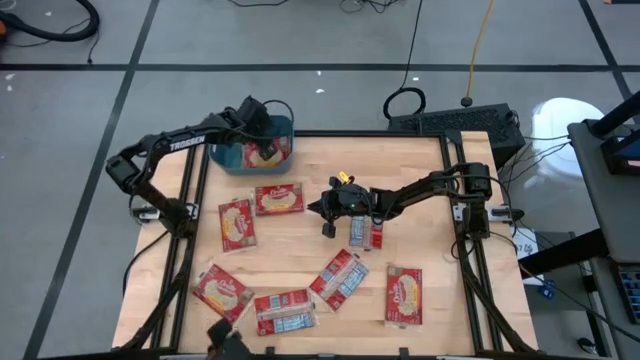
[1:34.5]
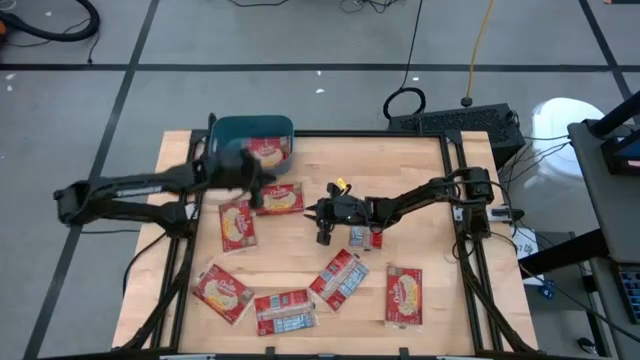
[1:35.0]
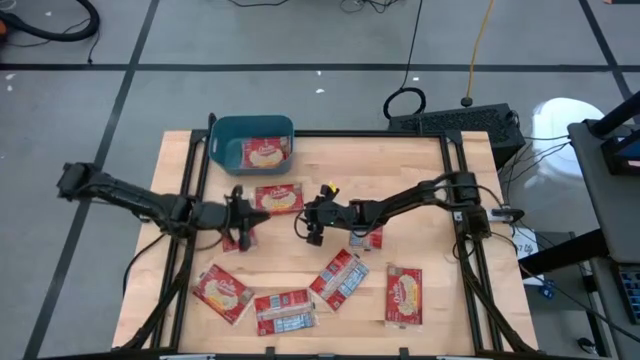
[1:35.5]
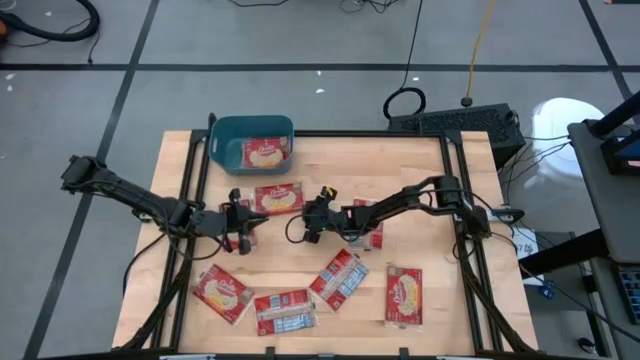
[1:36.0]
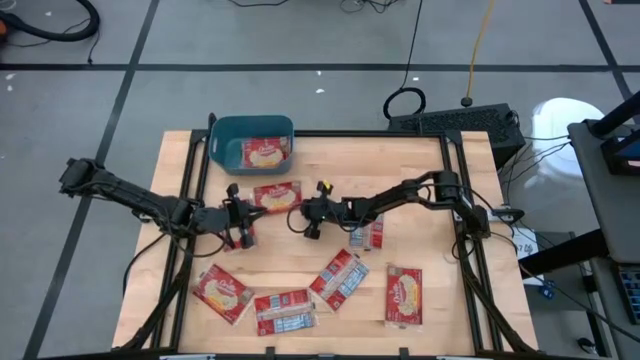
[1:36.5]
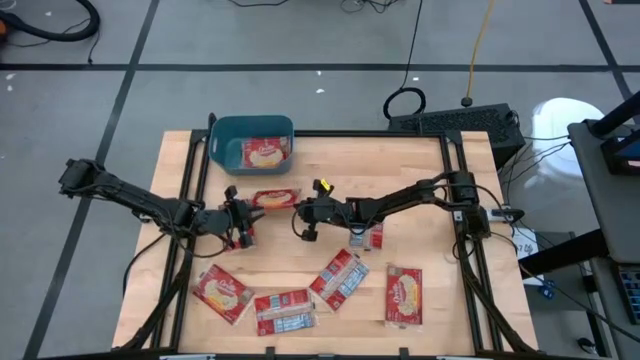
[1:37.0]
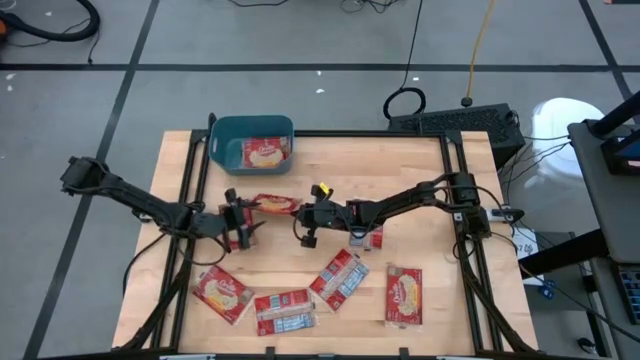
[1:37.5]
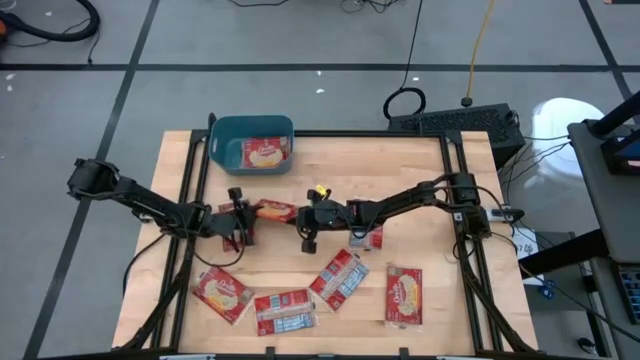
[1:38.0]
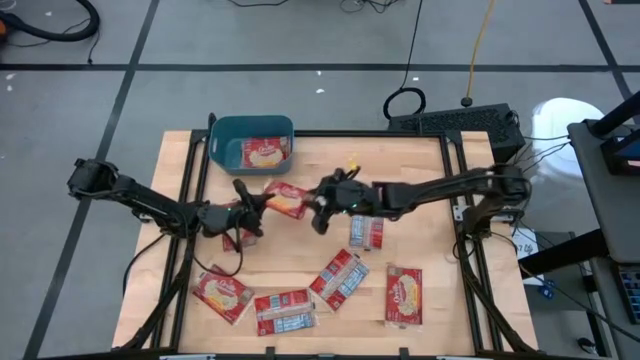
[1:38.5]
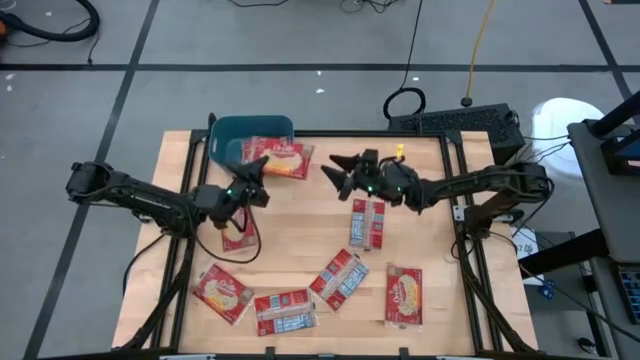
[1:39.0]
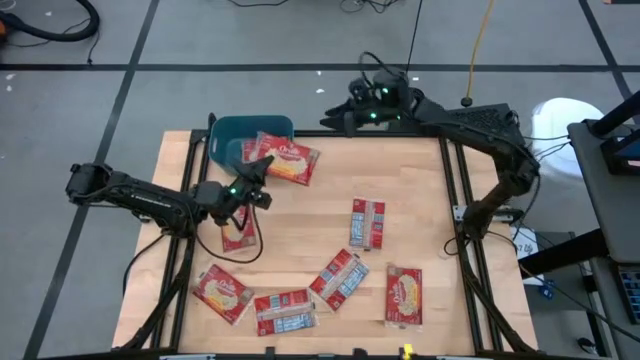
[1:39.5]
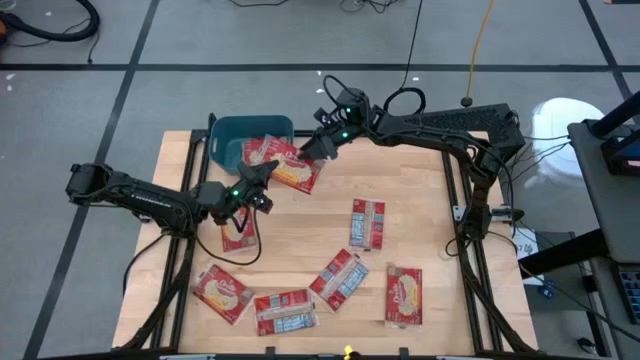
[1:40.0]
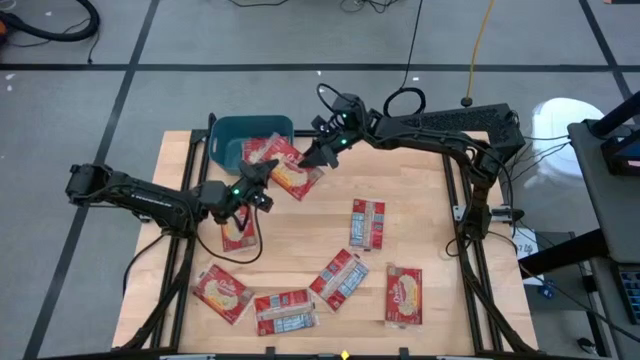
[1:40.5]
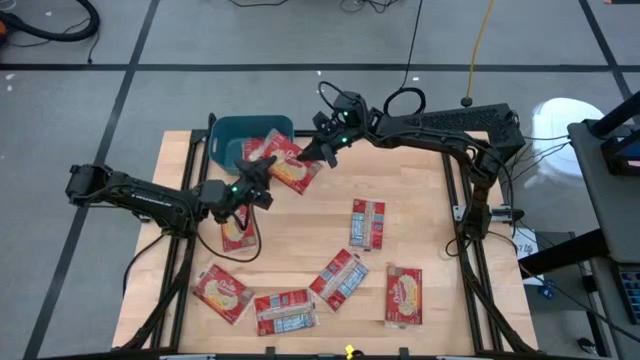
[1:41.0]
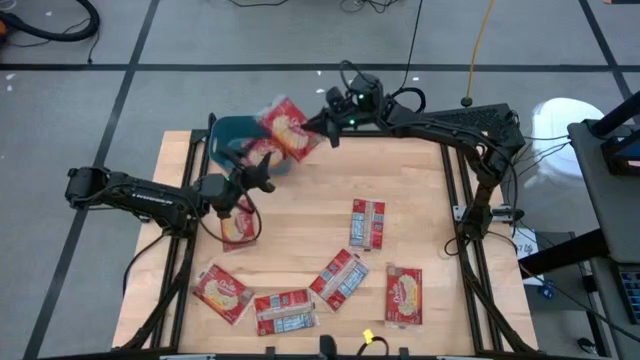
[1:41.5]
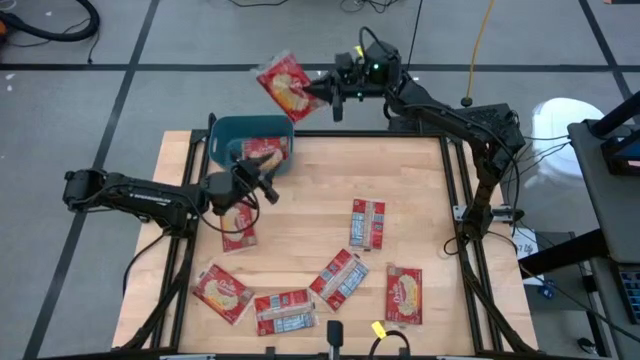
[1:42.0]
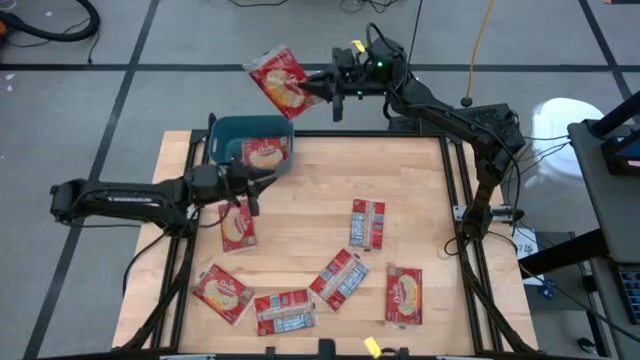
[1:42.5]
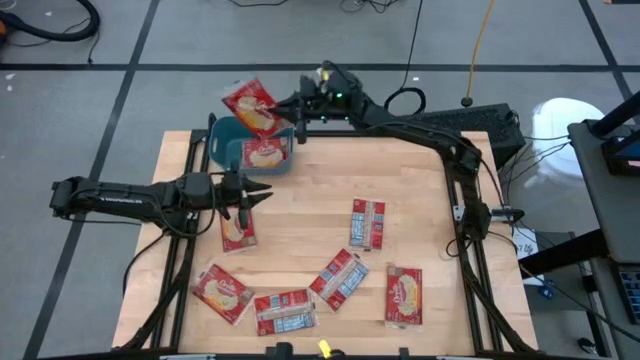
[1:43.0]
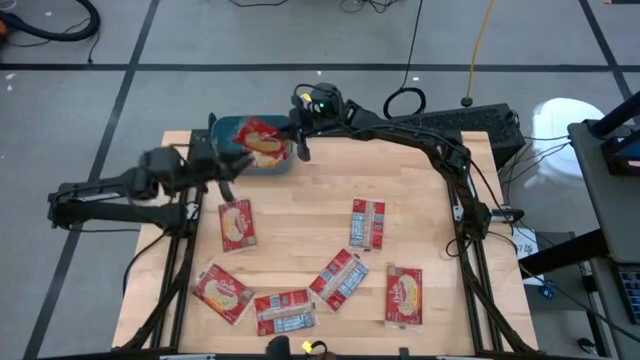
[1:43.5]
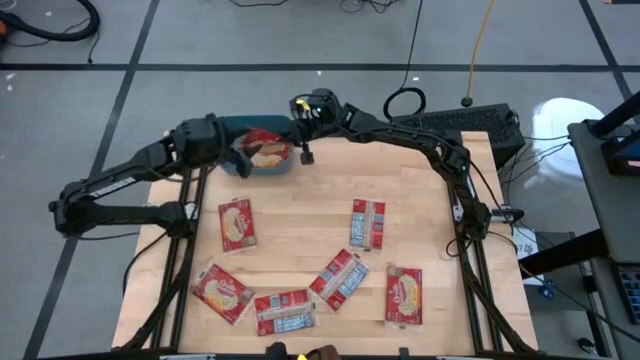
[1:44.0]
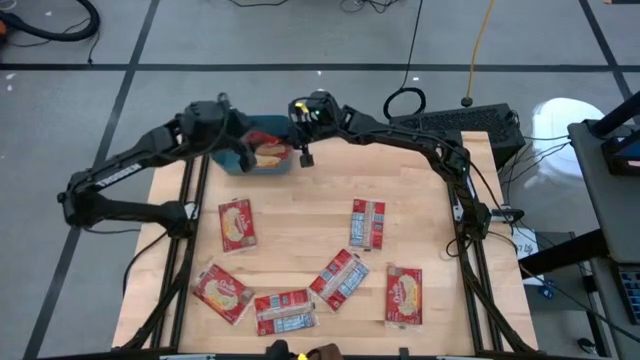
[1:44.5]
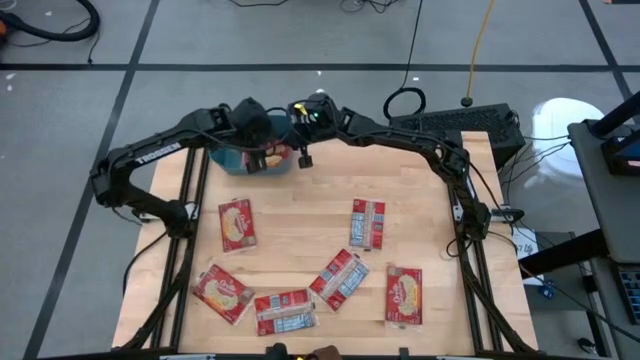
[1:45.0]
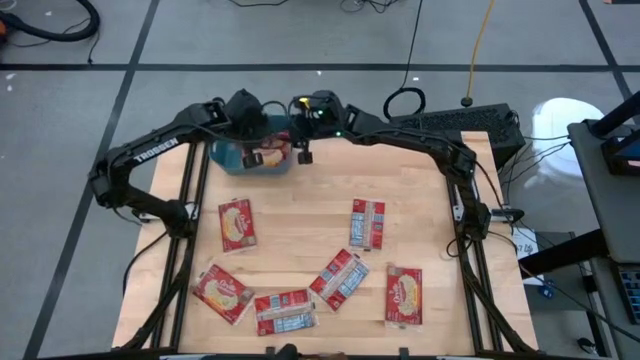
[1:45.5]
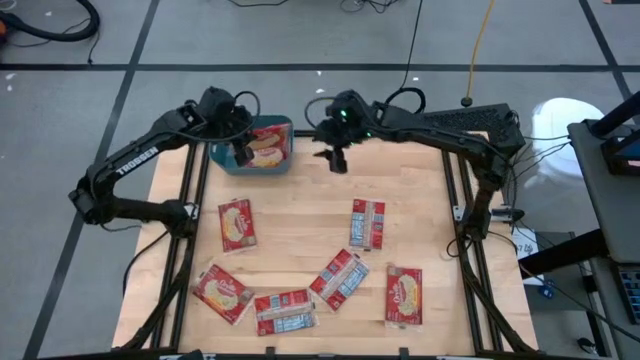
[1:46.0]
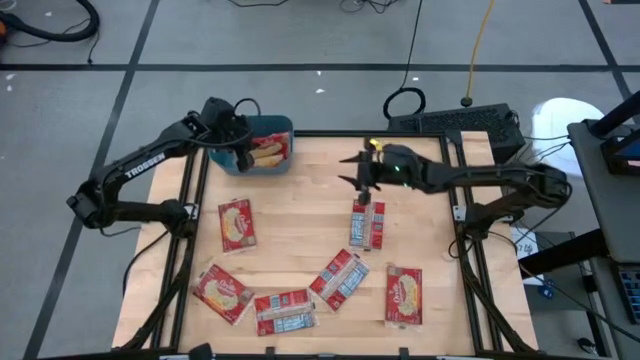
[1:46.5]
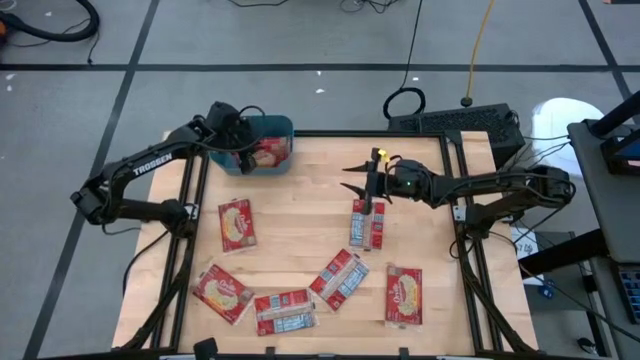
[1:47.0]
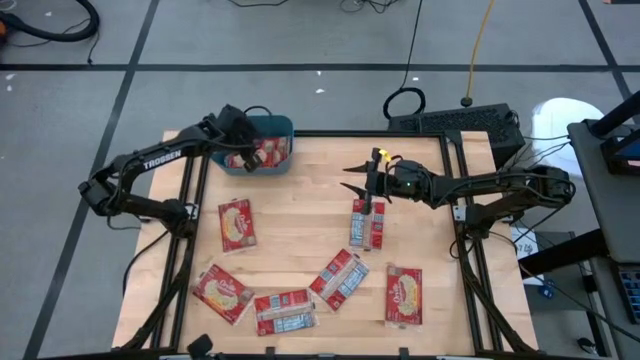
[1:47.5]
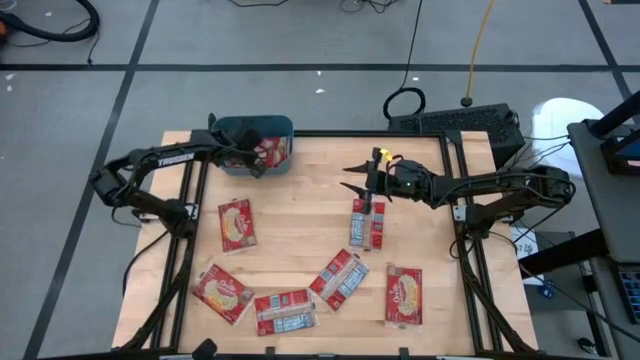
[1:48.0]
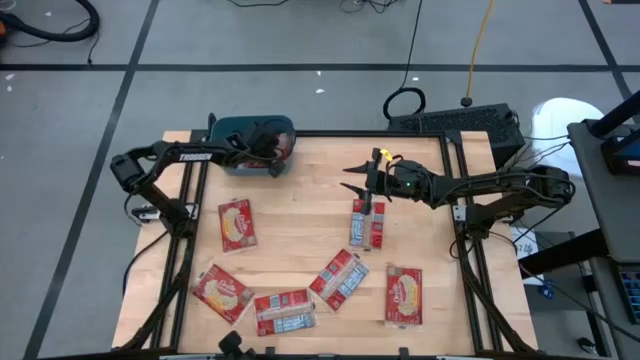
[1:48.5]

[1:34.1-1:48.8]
Task: Sort popcorn bags into baskets
Put the red popcorn bag into the blue bin

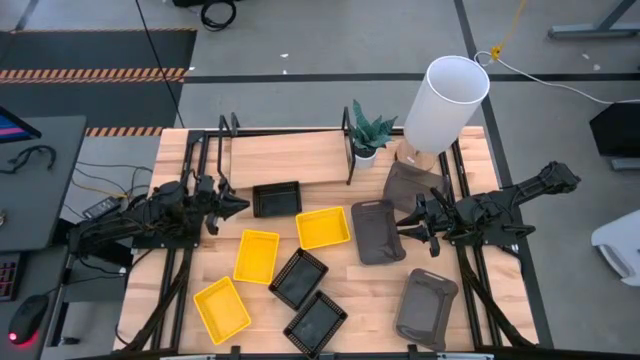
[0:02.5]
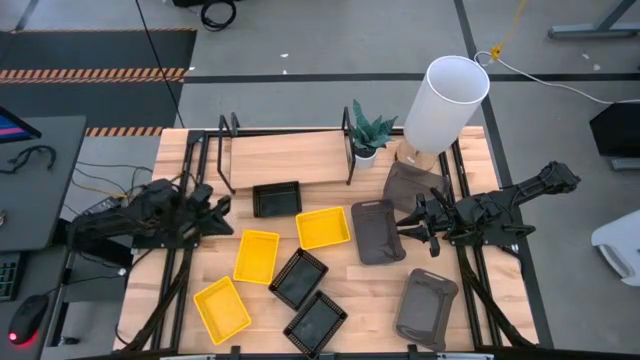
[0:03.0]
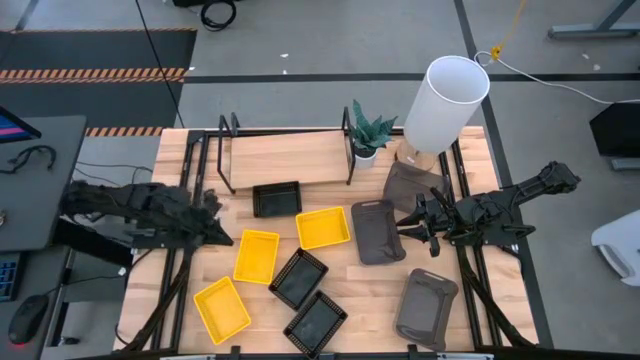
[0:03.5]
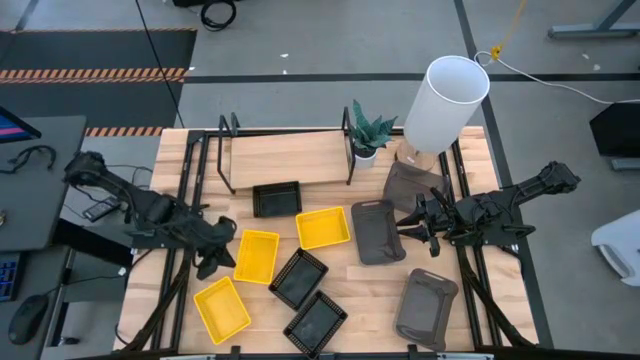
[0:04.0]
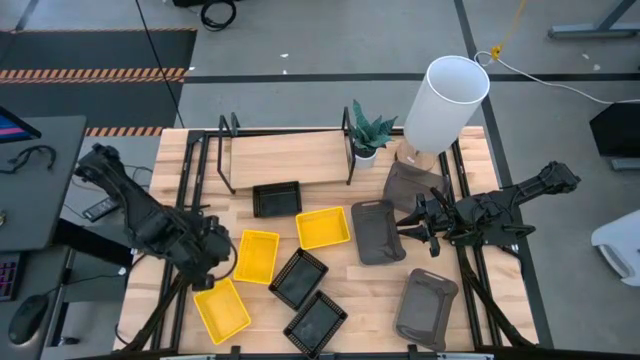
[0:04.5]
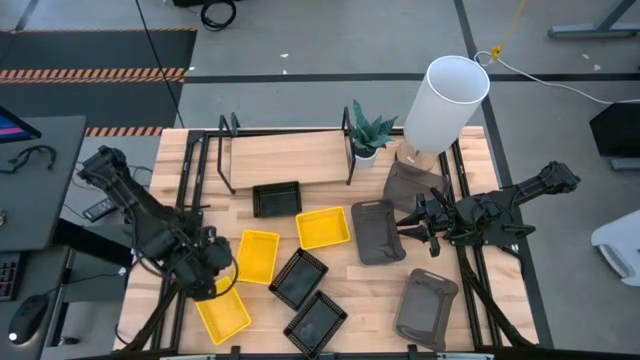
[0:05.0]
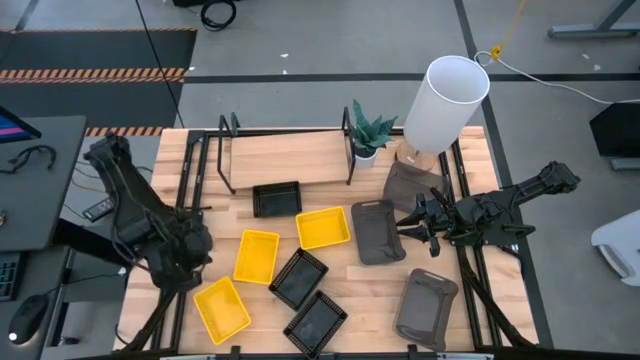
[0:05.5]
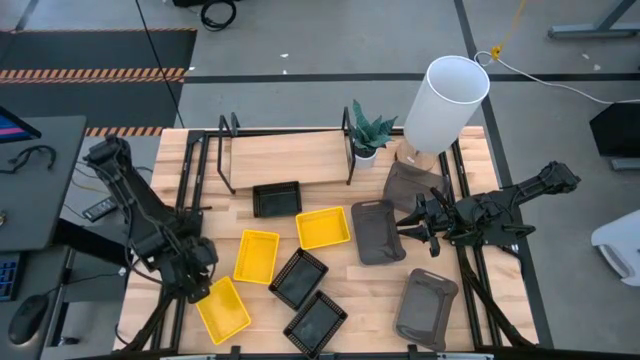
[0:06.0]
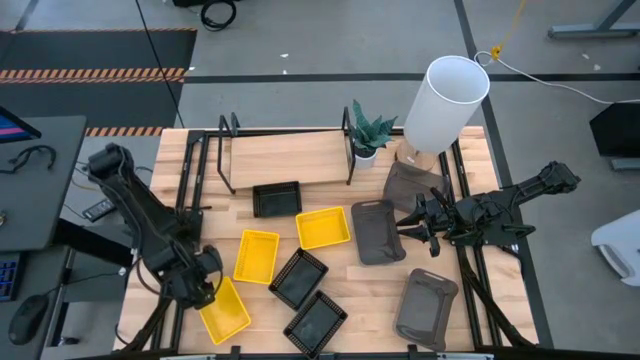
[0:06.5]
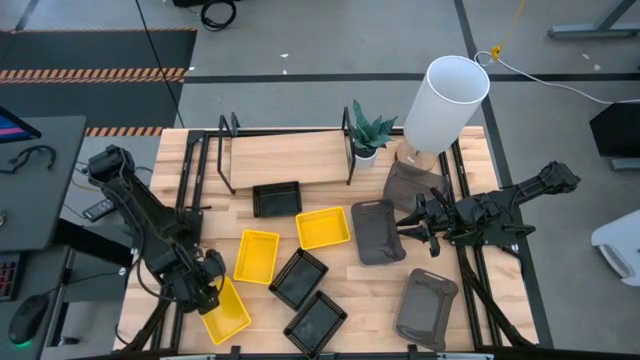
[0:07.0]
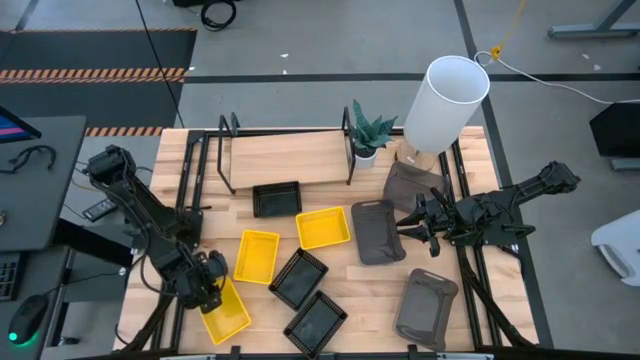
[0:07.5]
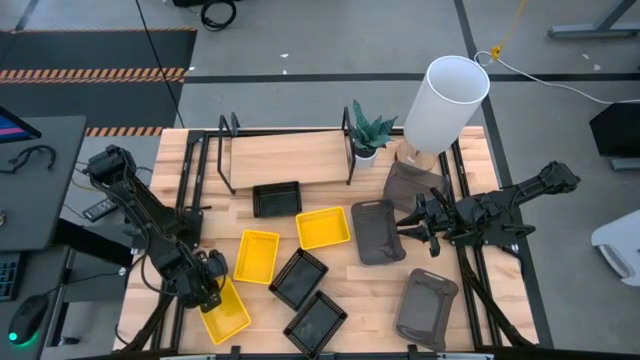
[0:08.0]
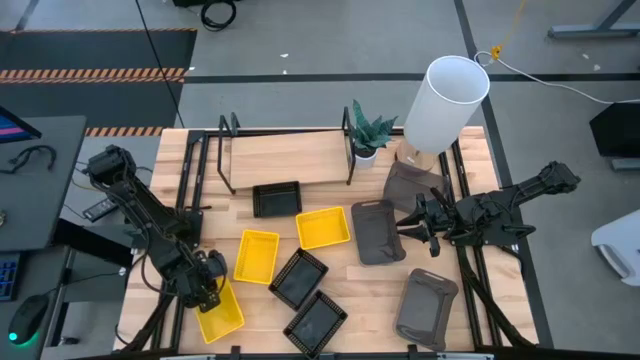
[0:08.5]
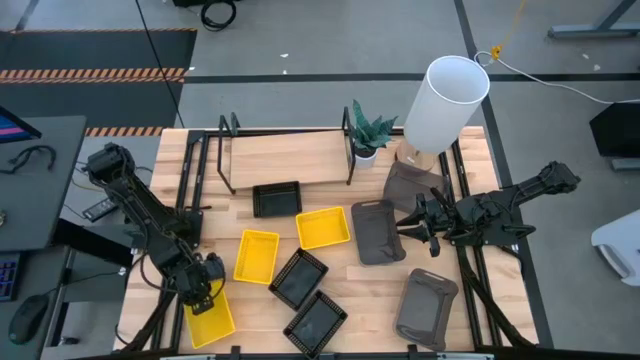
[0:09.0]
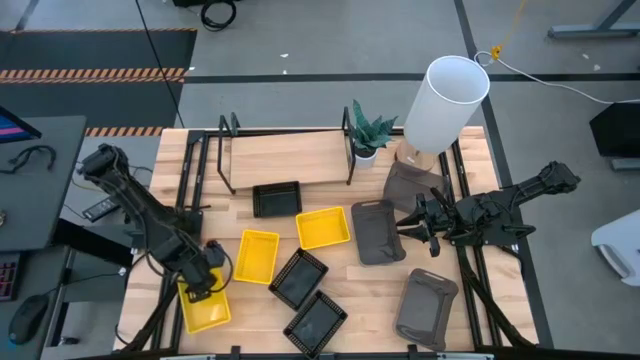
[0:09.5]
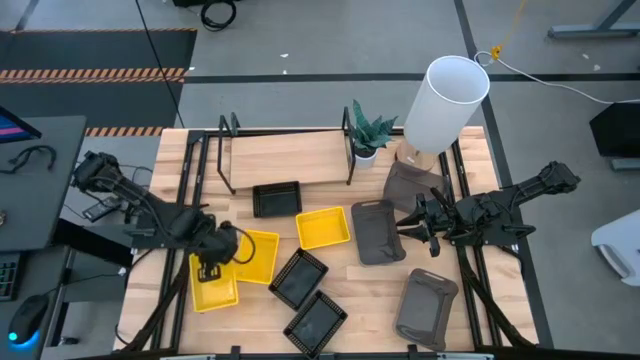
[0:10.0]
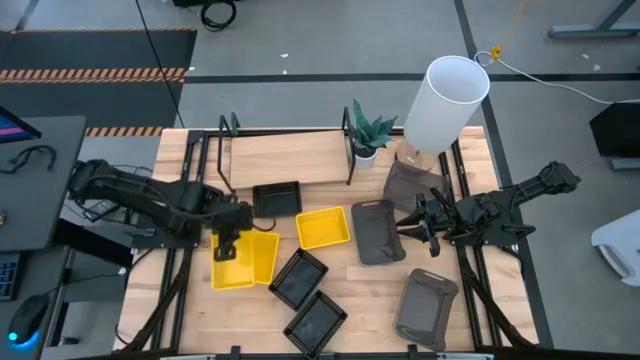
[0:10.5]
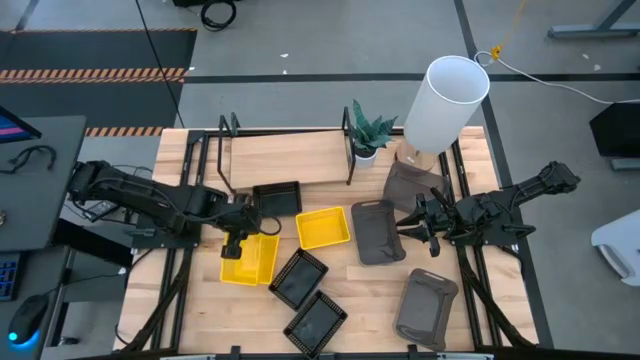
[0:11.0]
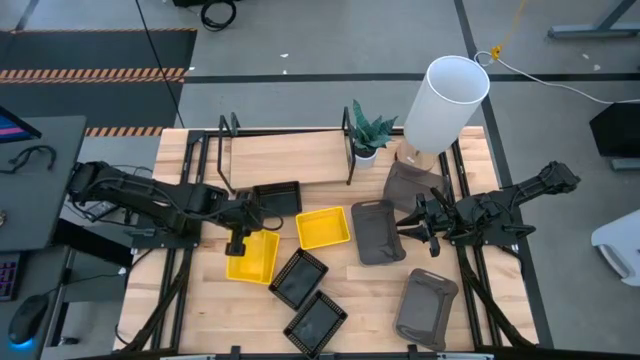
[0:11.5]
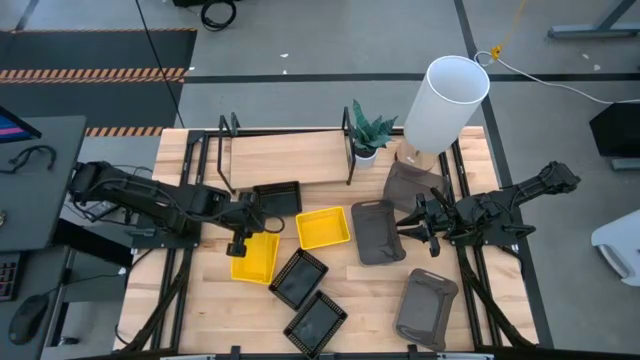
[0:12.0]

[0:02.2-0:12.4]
Task: Stack baskets on shelf by color
Stack the bottom left yellow bin on the middle yellow bin
